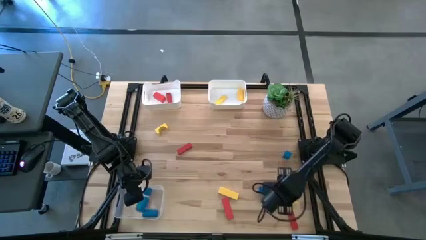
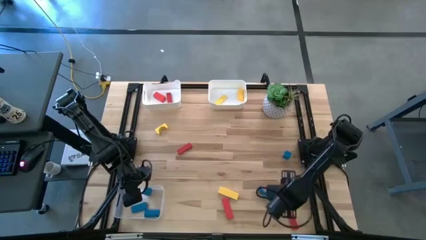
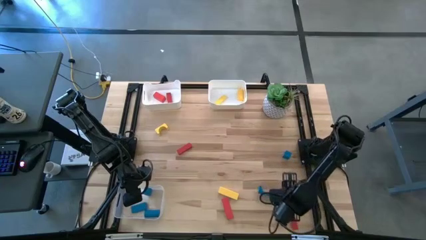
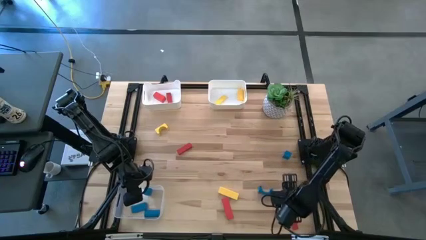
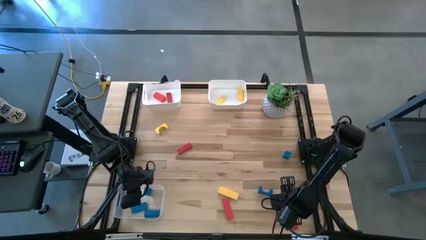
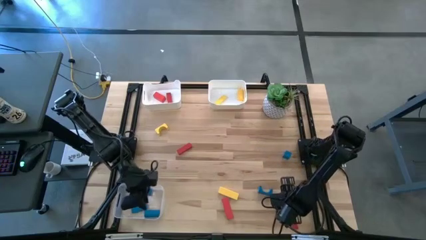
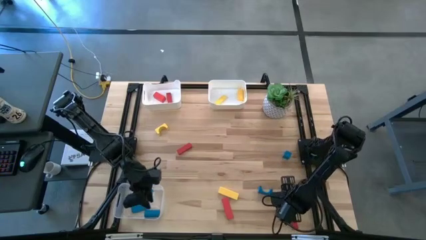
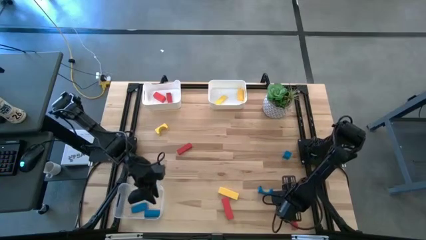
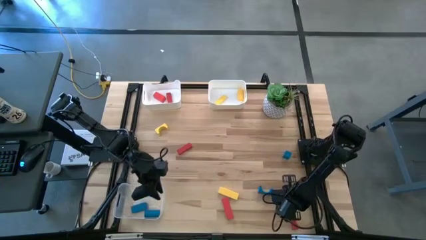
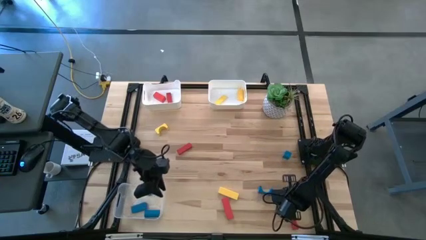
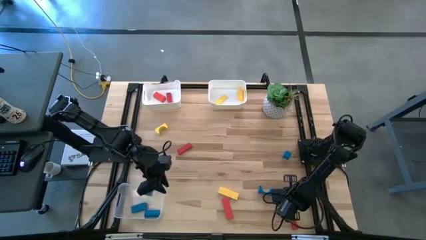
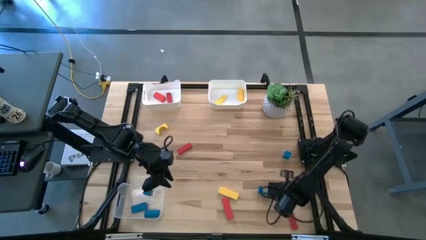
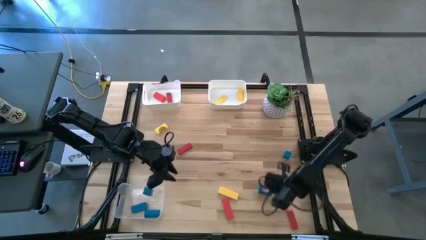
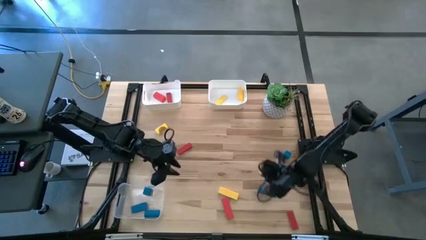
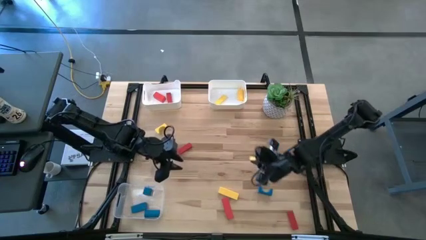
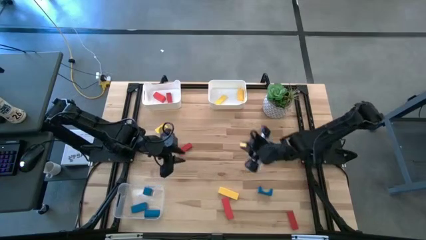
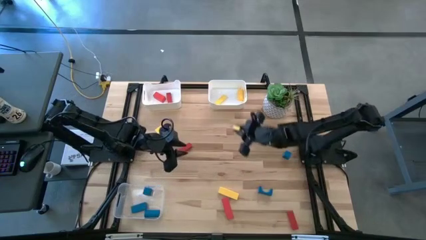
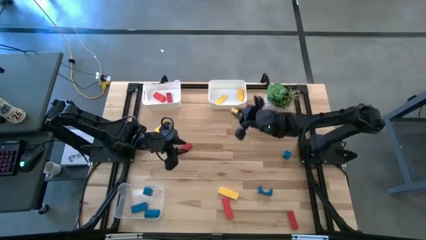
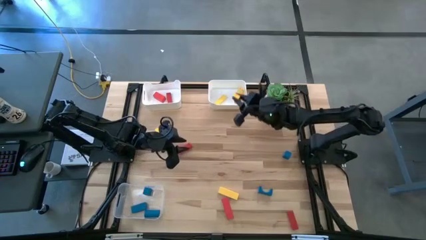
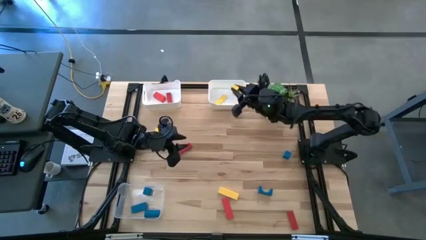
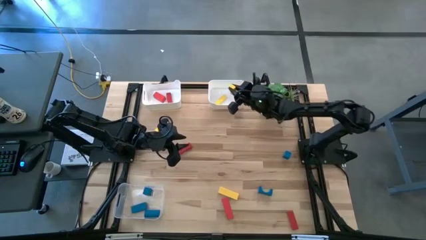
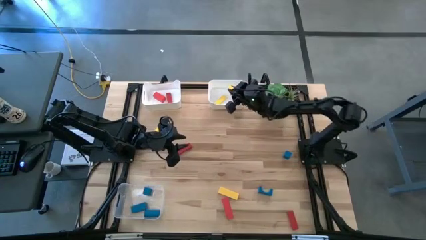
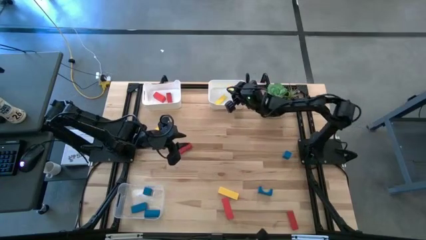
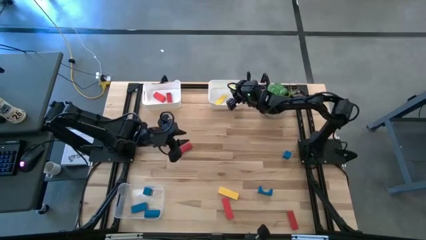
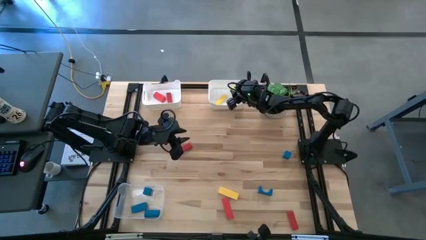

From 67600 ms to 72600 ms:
Task: Sort & place blocks by color
Put the yellow block into the right white bin

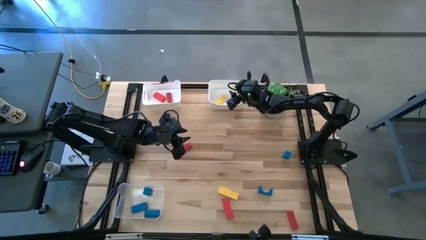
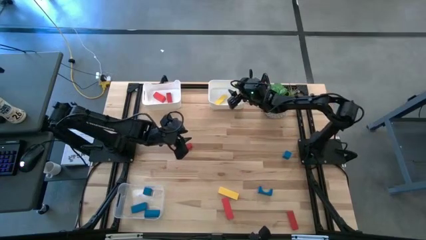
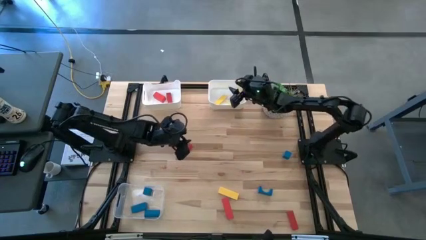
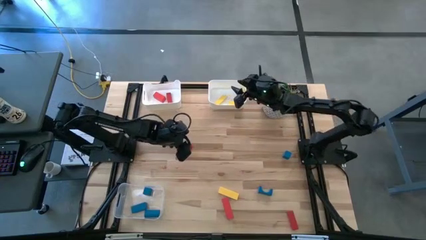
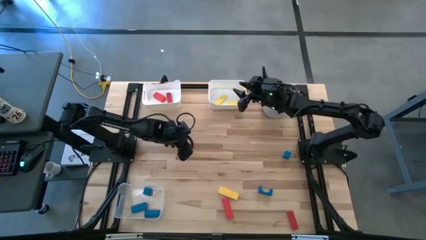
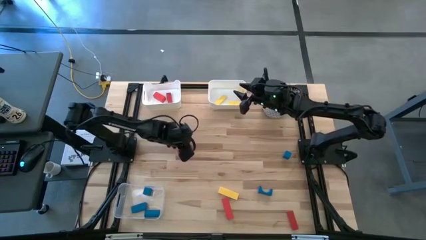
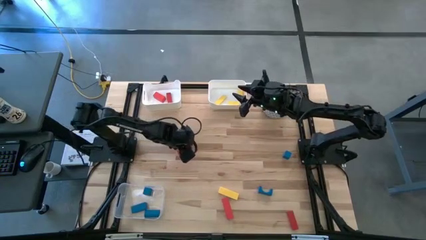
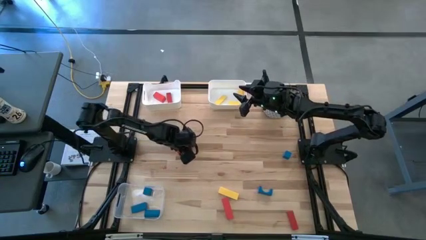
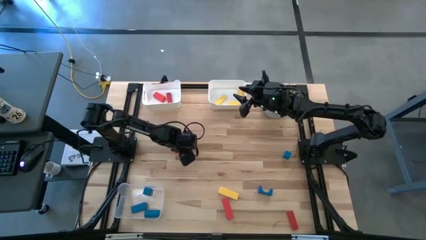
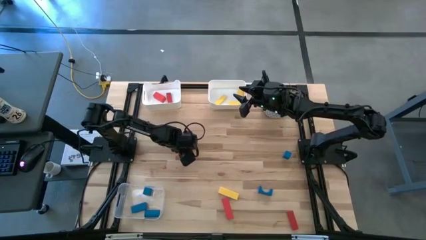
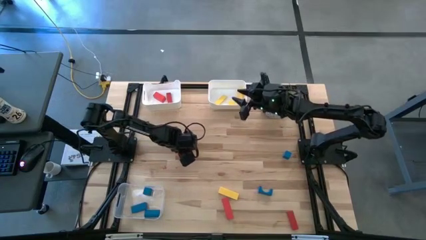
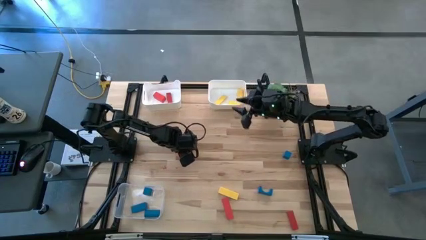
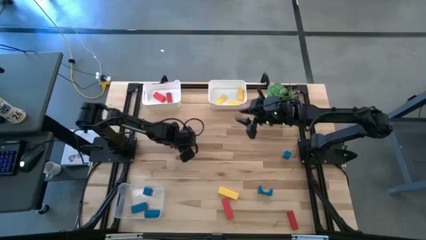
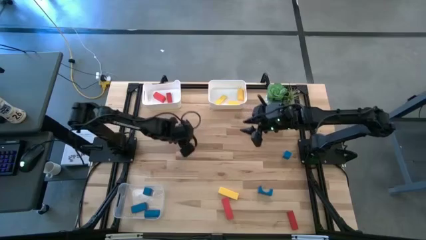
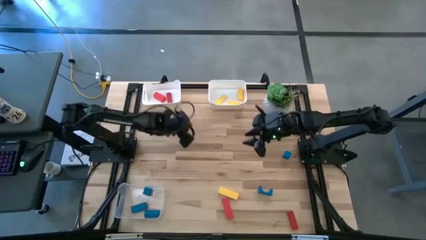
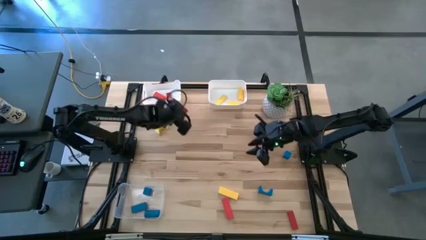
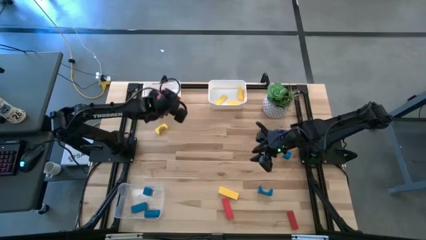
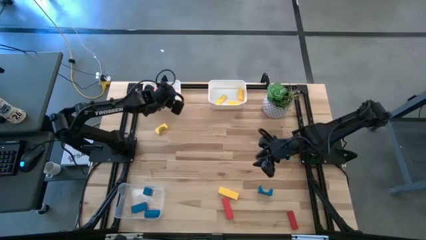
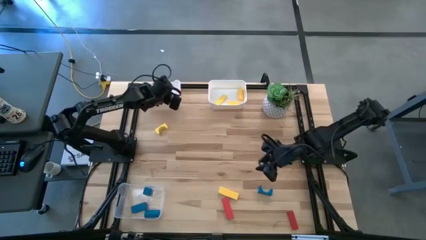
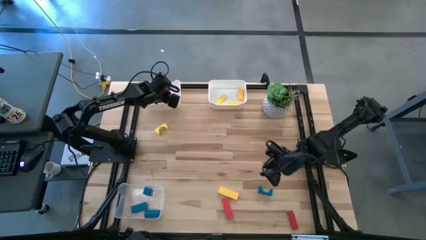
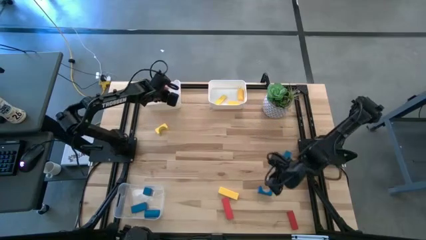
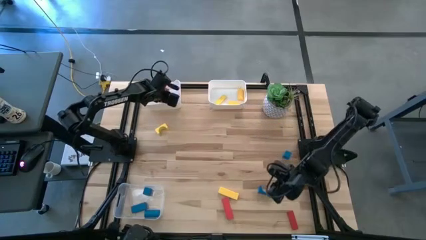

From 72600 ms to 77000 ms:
Put the red block into the left white bin

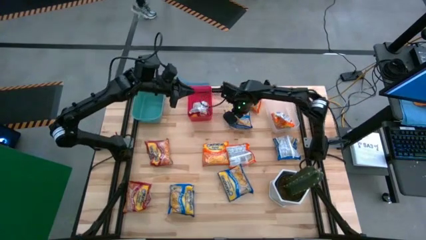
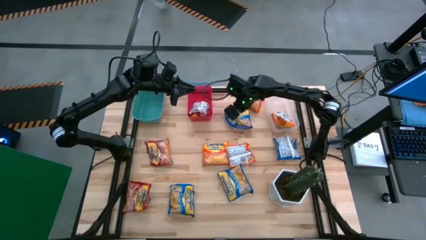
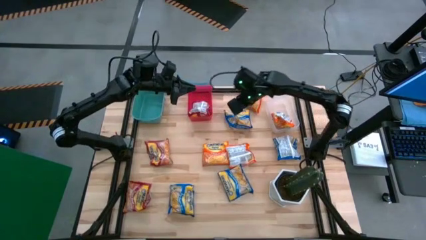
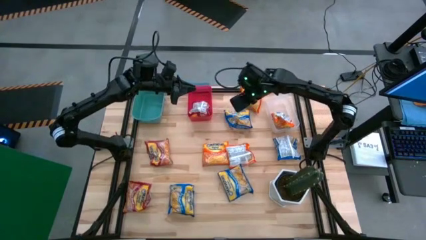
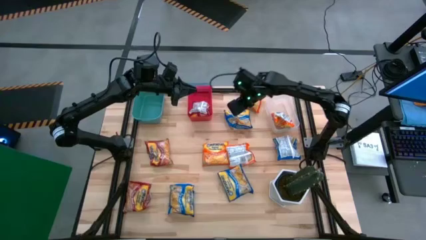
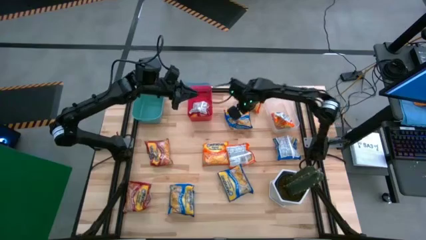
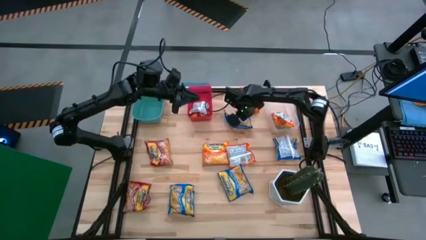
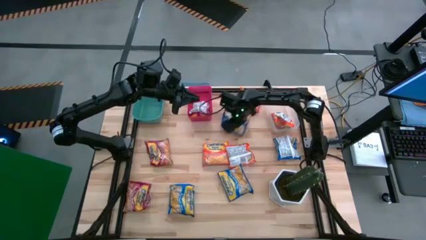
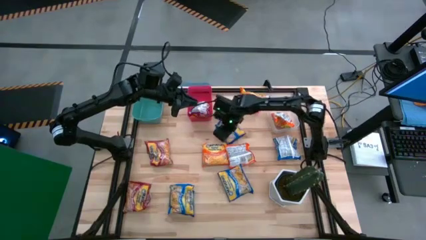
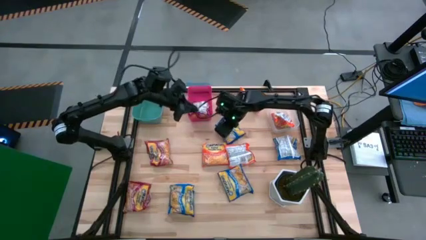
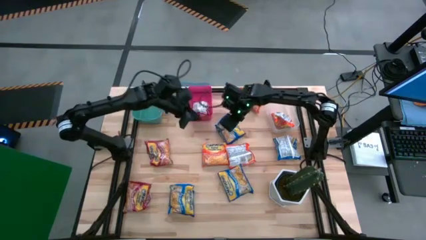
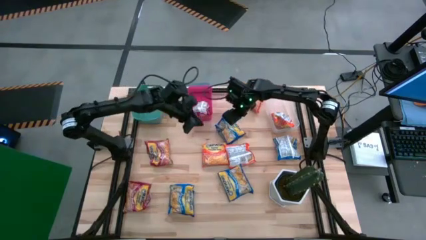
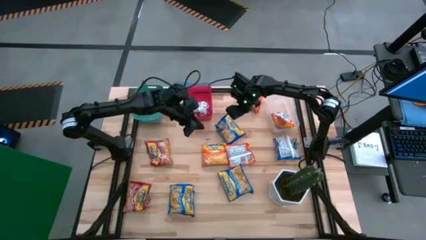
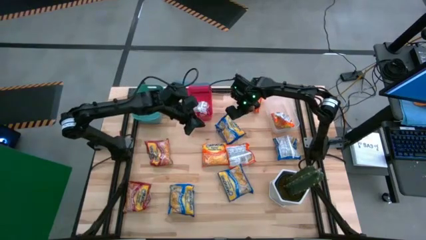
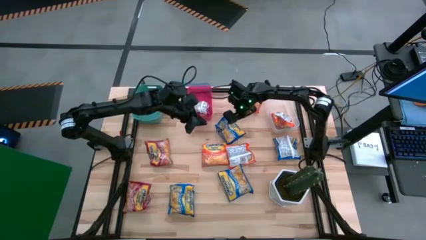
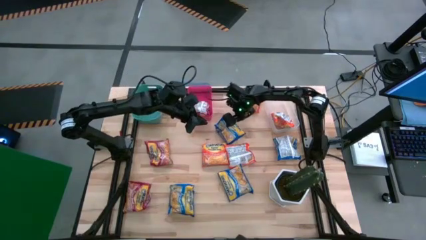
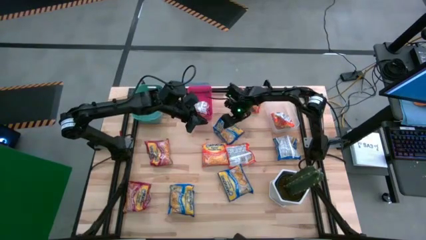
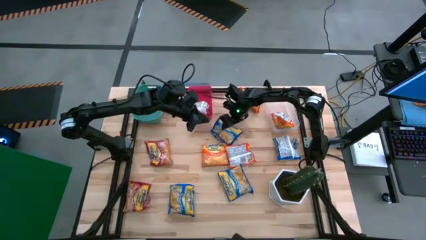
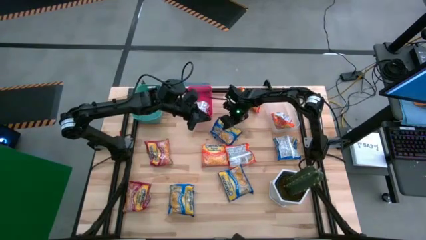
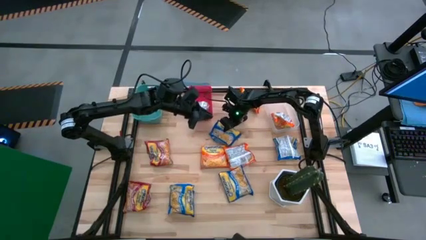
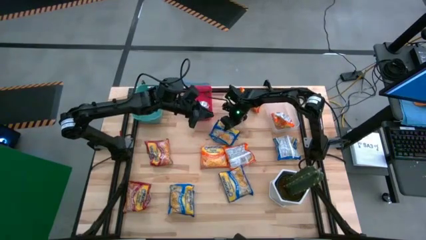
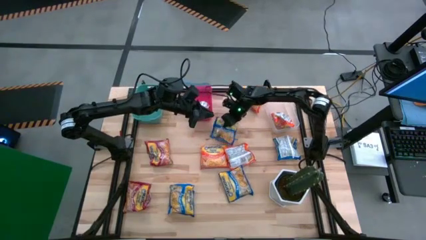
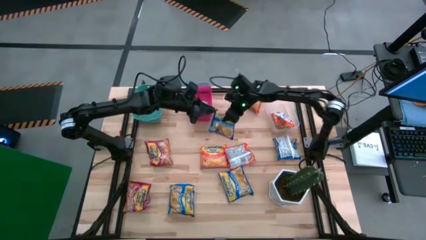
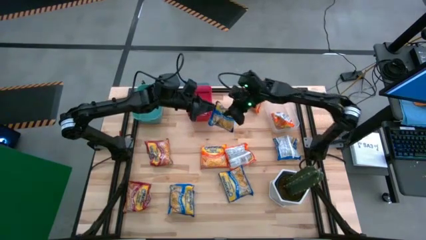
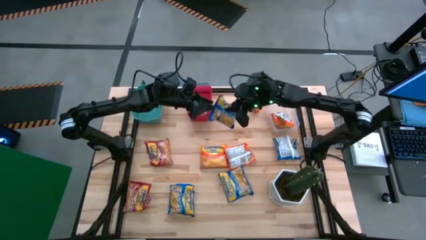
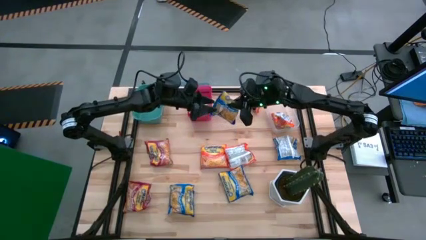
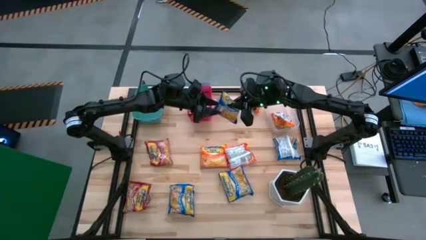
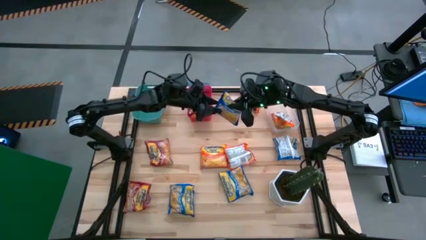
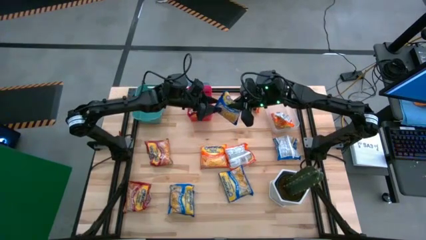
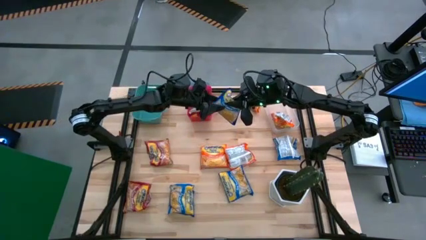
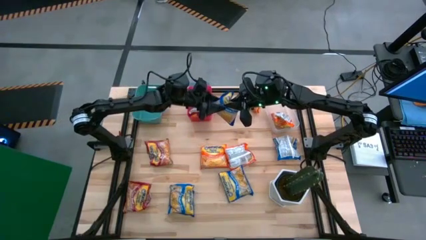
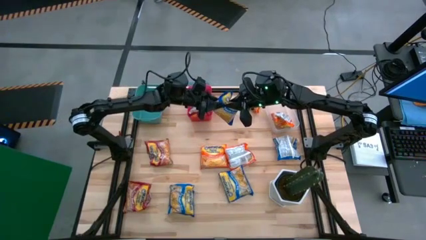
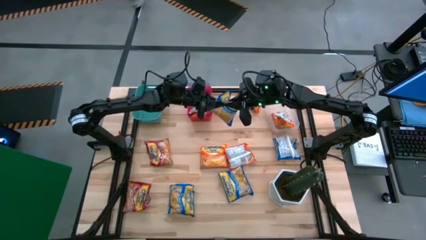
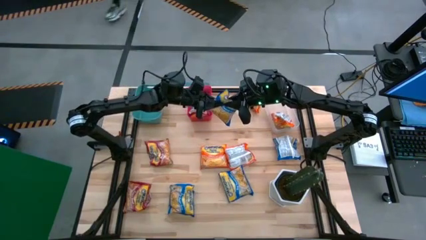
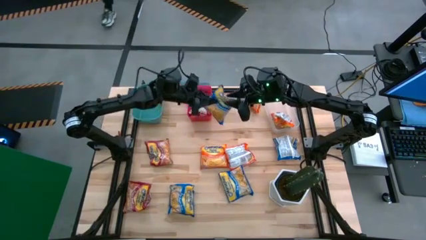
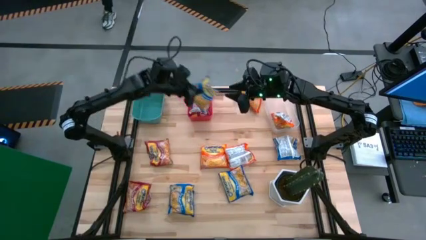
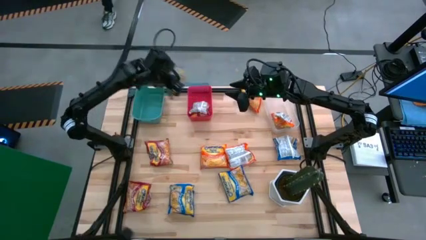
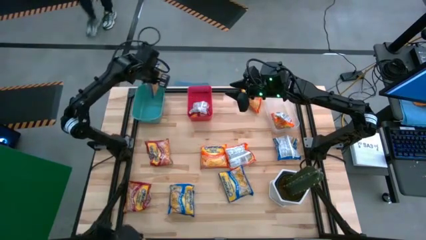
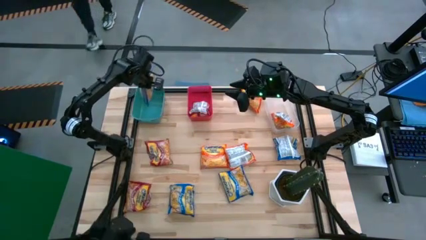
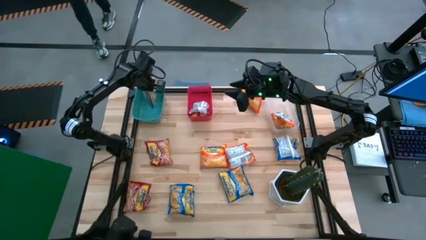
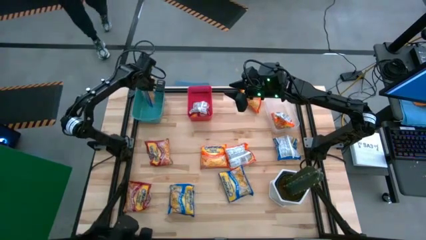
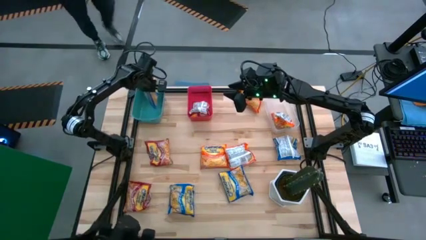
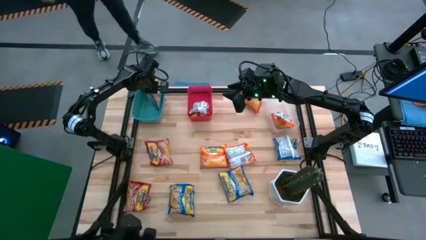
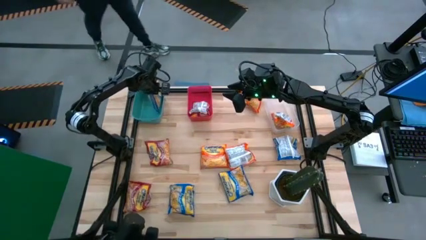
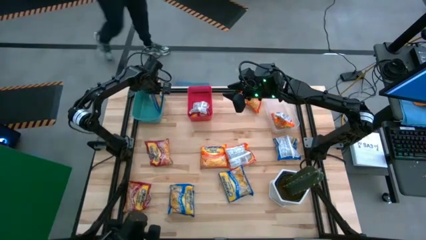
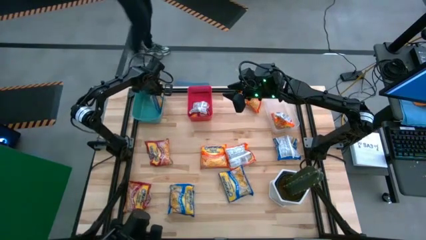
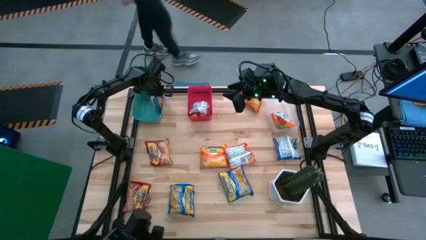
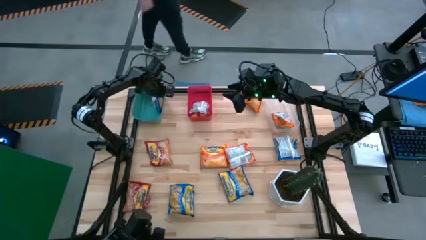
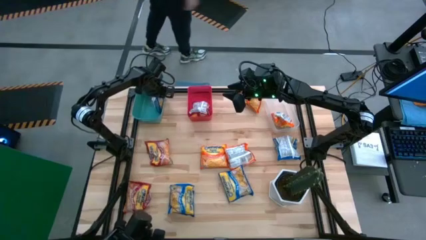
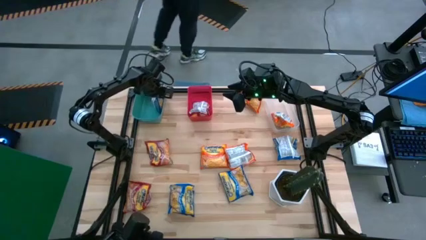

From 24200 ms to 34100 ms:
Task: Sort Maruchan noodles
Put the blue noodle pack into the green bin
